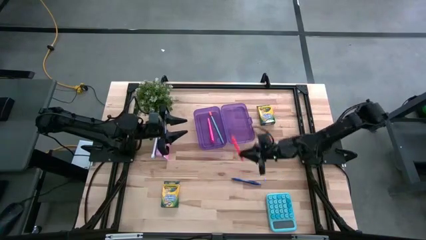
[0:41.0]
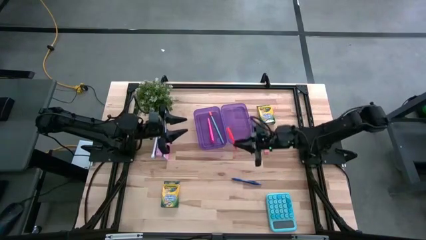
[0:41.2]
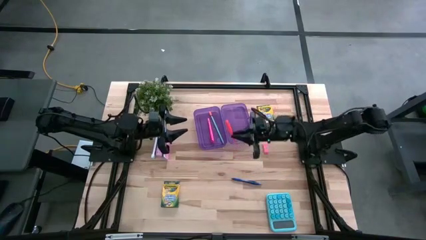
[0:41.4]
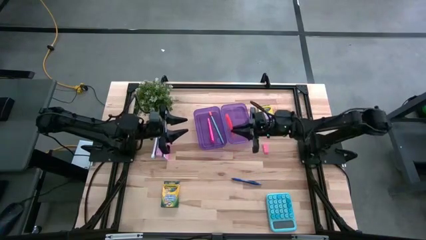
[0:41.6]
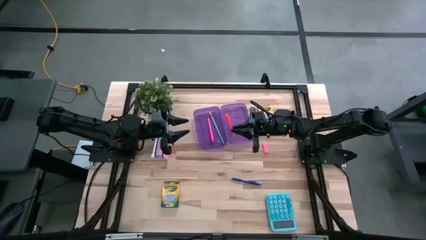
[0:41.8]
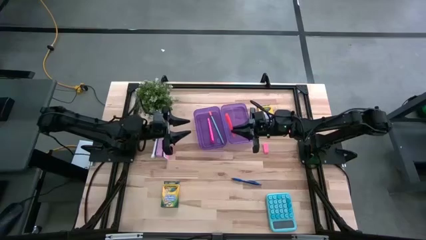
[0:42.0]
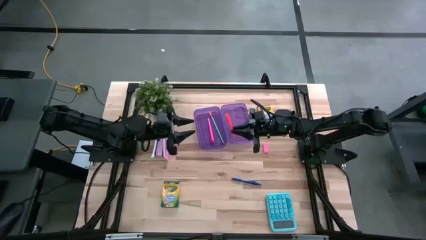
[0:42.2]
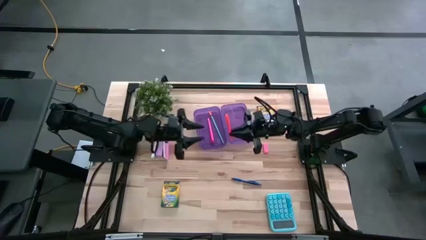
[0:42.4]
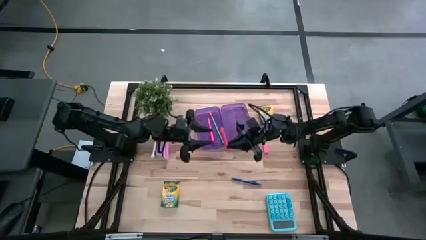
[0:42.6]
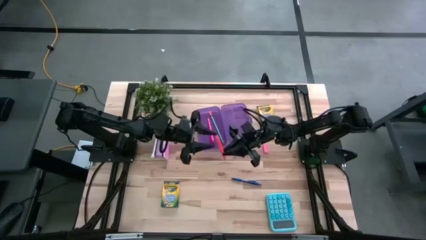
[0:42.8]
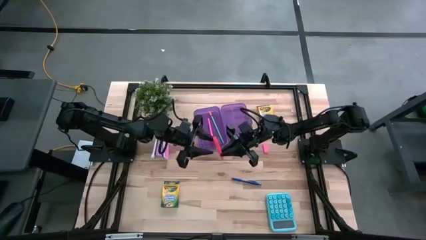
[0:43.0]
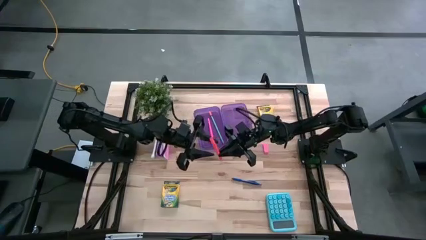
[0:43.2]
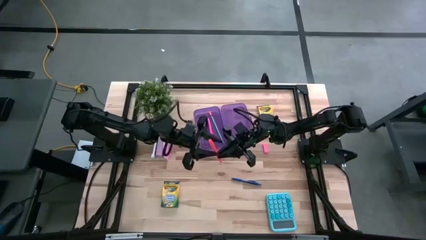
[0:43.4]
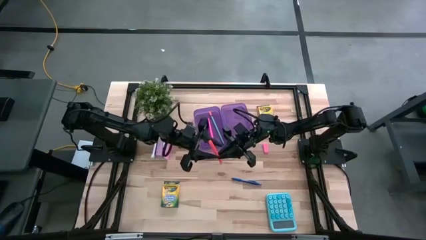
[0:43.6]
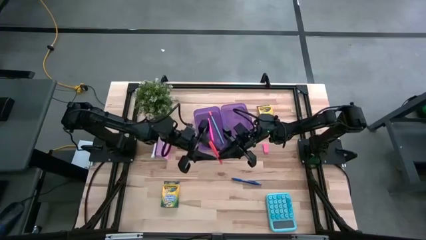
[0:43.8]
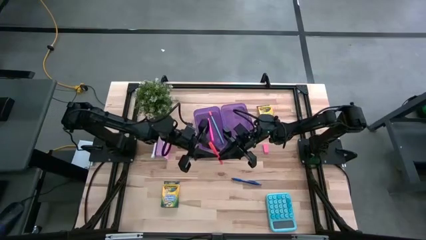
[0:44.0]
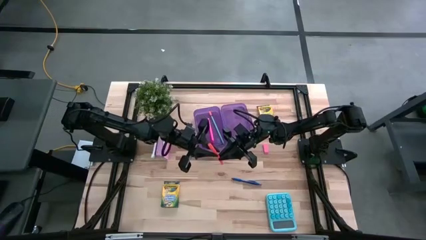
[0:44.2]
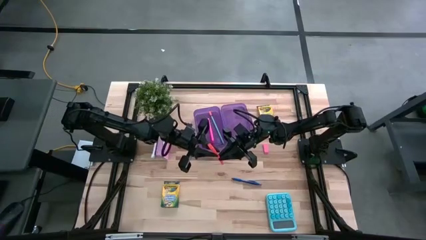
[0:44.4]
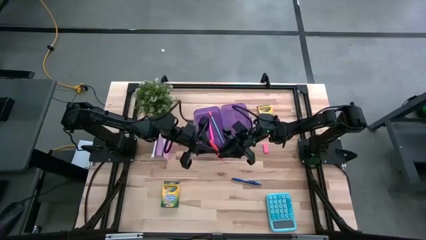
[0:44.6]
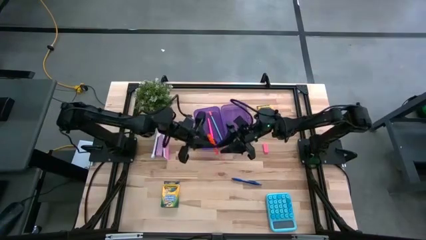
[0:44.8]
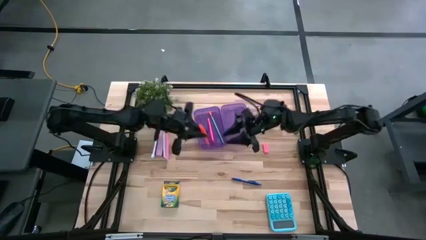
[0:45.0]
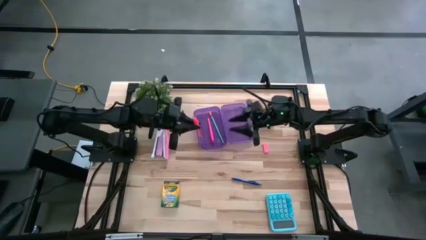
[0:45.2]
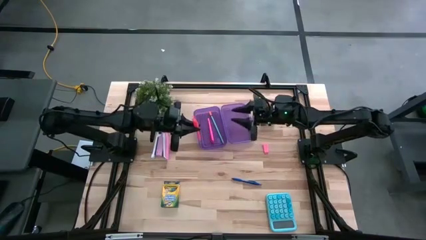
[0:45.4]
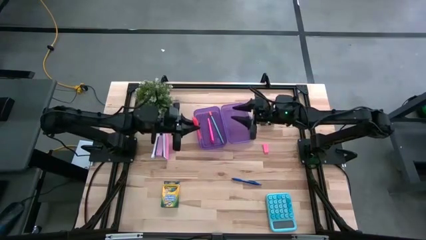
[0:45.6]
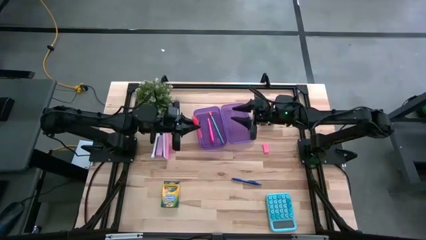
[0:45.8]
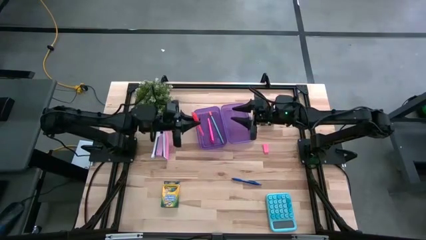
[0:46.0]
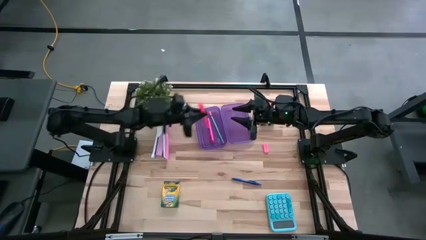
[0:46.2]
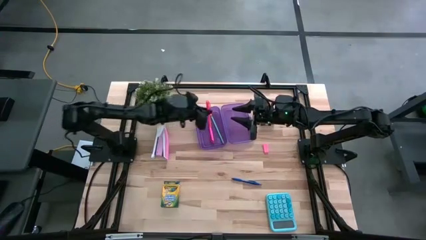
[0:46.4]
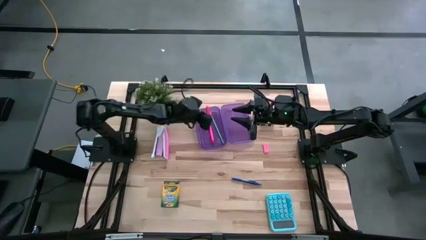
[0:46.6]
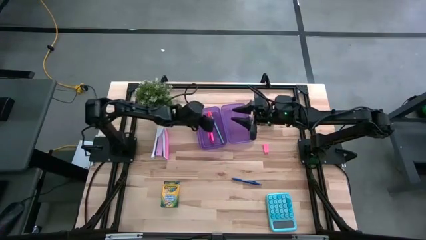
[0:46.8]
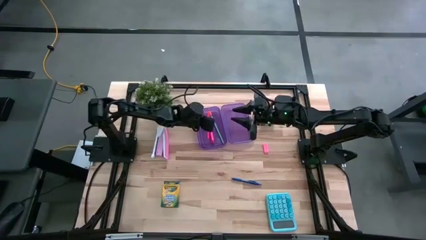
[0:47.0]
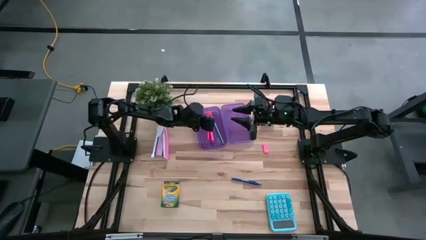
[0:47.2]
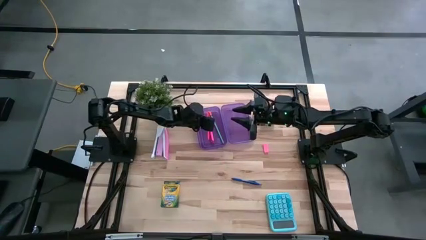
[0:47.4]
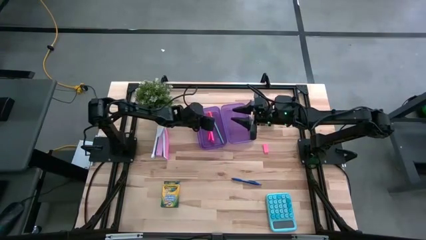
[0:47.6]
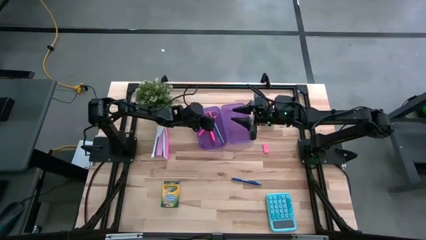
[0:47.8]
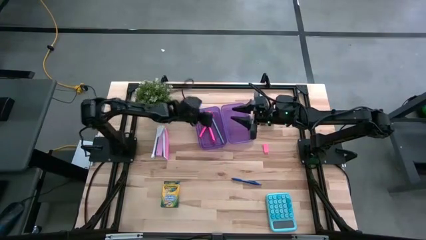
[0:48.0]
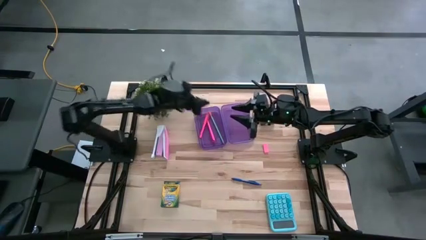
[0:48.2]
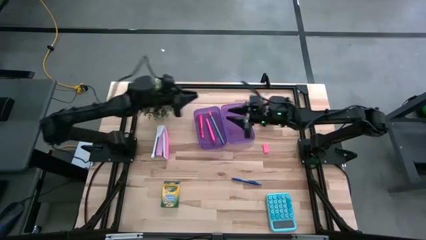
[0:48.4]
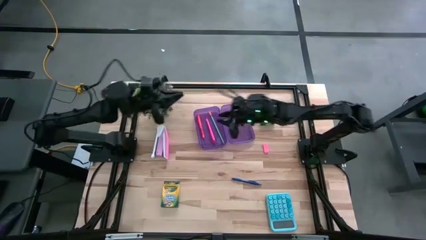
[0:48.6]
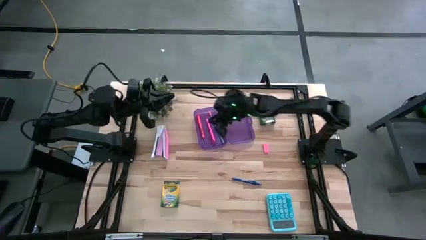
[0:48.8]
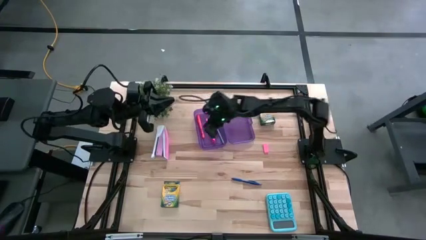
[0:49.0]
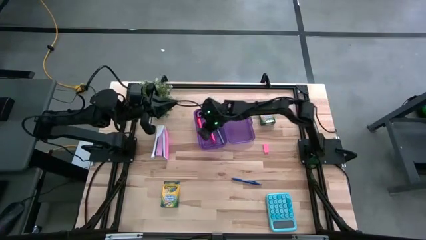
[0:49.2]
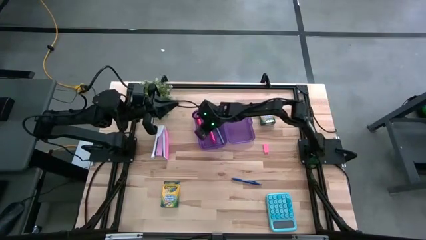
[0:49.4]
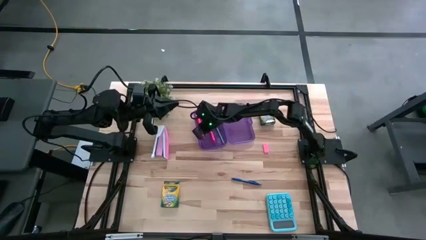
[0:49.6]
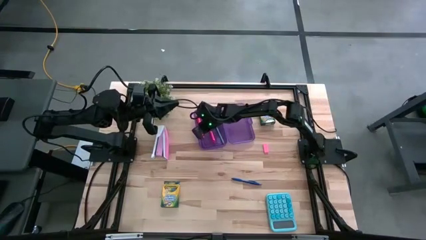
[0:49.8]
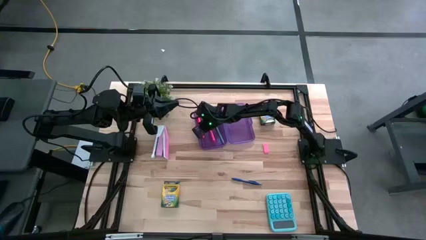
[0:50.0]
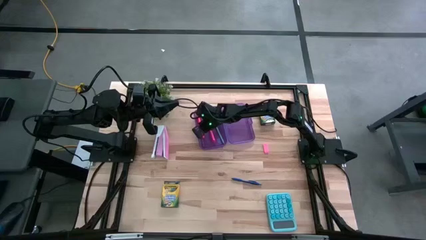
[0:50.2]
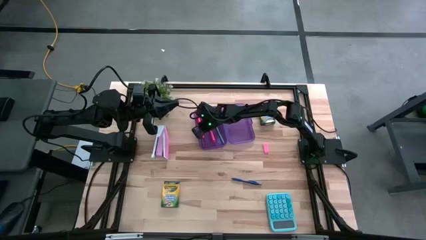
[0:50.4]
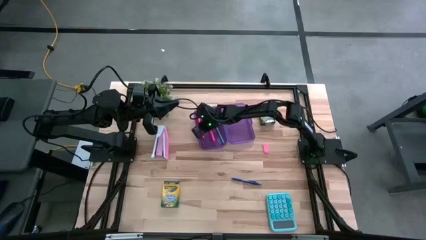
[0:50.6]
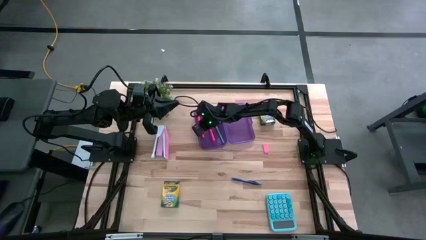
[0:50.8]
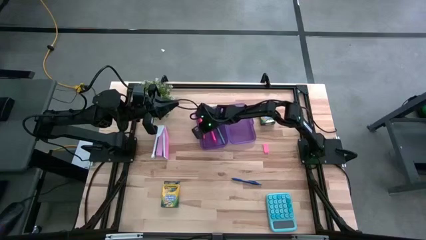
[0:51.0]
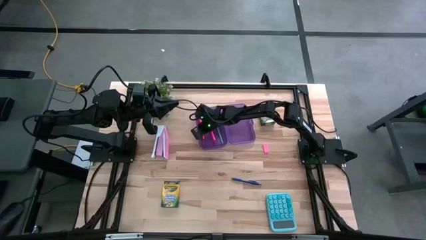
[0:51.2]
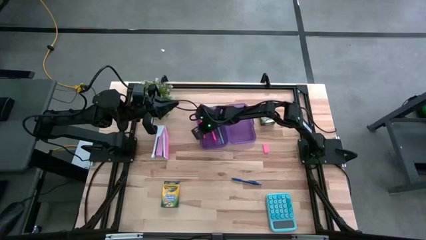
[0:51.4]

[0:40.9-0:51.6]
Task: Pick & place school supplies into a supply box
Put the orange pen into the purple supply box

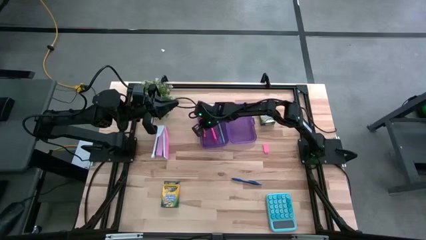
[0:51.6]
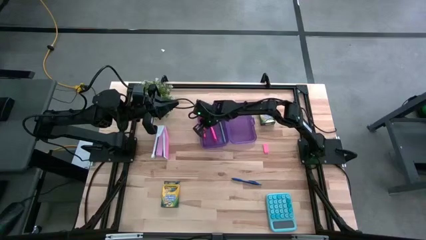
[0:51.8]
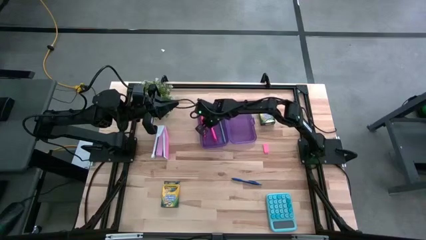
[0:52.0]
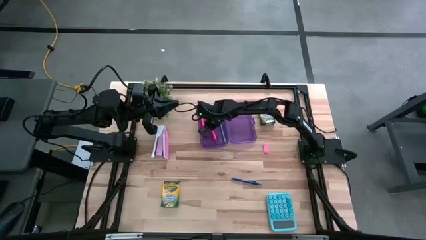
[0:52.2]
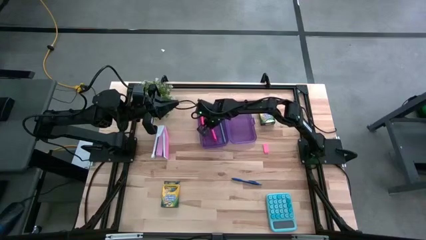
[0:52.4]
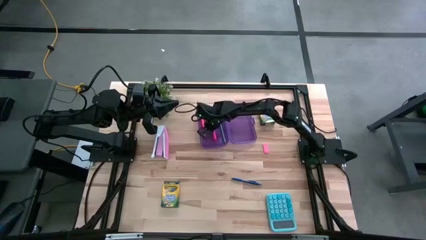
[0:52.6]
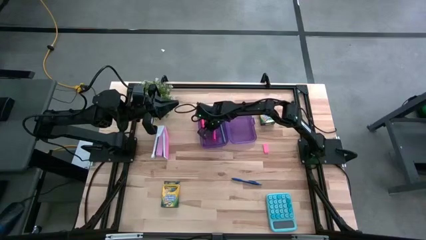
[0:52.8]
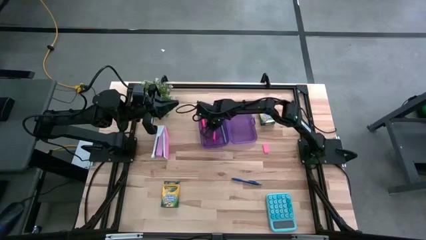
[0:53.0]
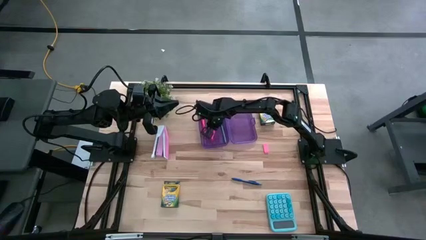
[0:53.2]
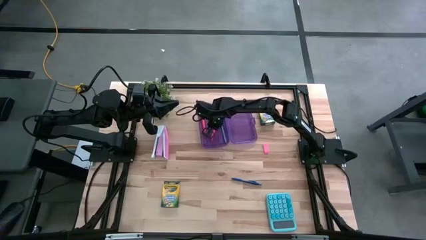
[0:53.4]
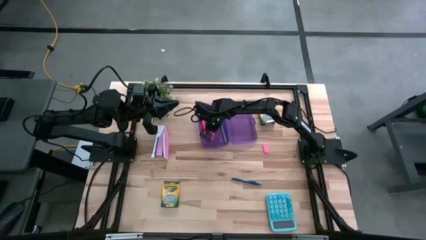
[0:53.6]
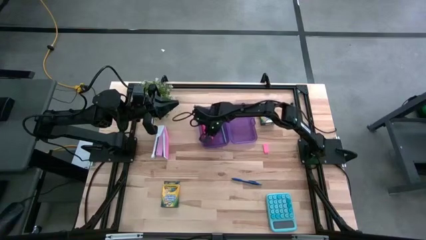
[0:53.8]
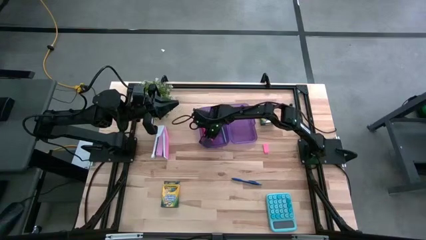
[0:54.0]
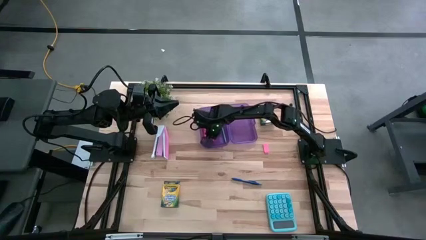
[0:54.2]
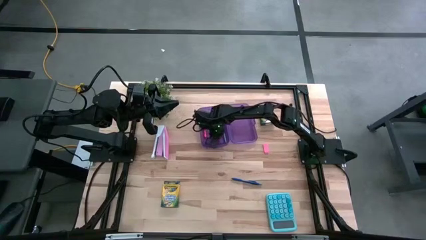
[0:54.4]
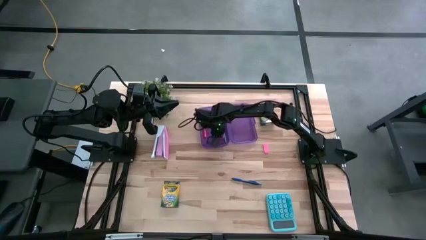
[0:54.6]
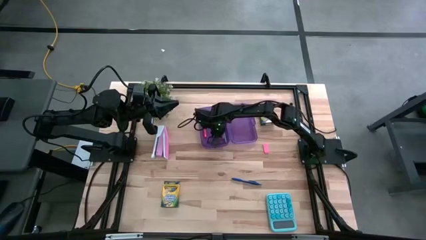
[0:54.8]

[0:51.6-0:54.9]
Adjust the pink pen in the purple supply box
